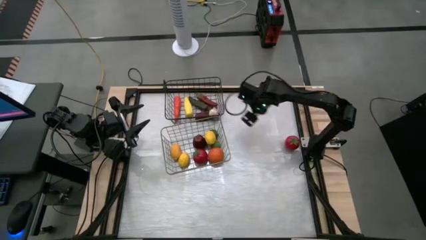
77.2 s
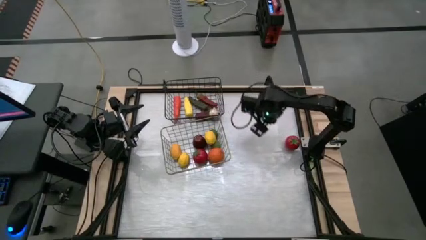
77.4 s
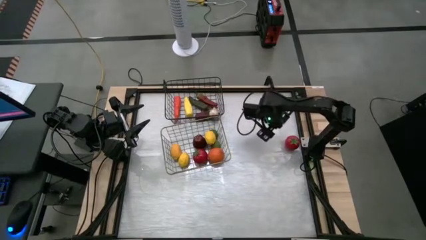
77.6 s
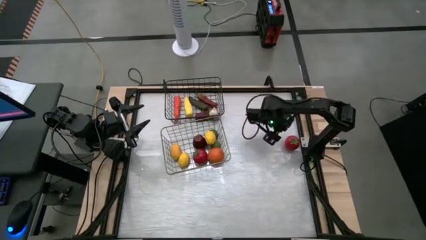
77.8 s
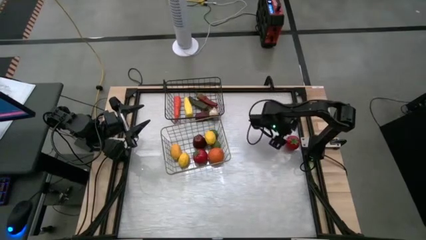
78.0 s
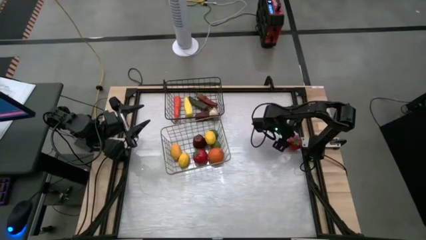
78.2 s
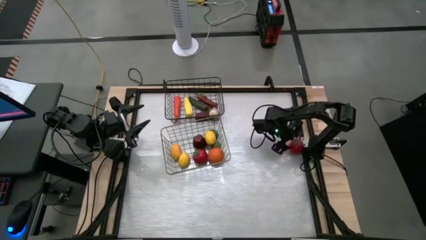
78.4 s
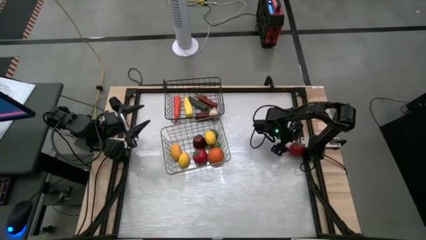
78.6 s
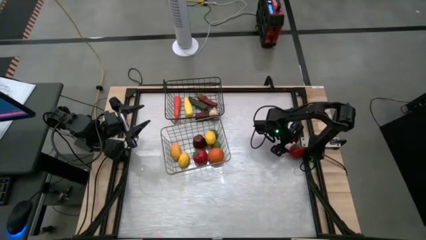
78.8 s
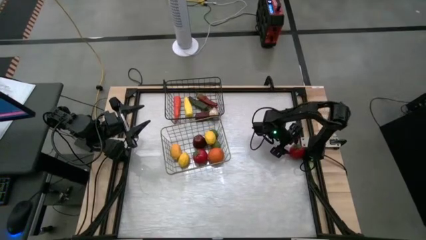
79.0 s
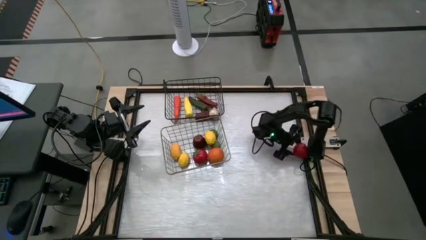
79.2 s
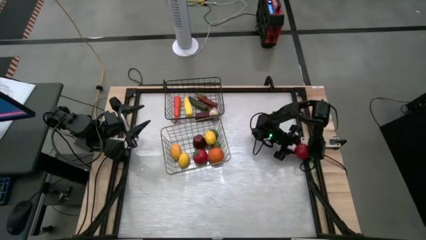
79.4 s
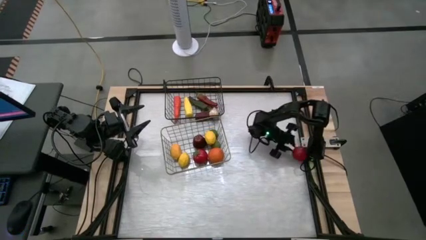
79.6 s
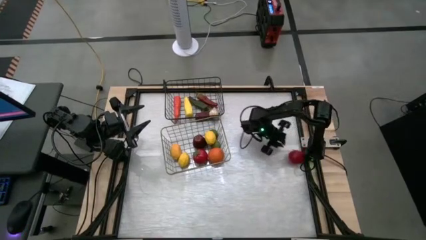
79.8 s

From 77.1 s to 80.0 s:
Task: Sort produce into baskets
Put the red tomato into the brown wire basket

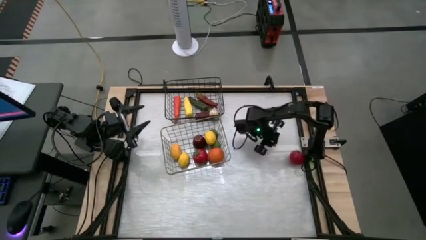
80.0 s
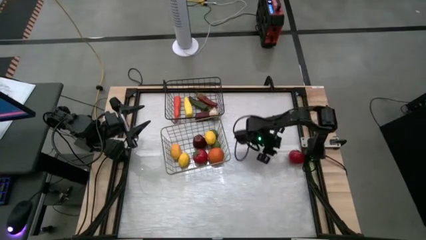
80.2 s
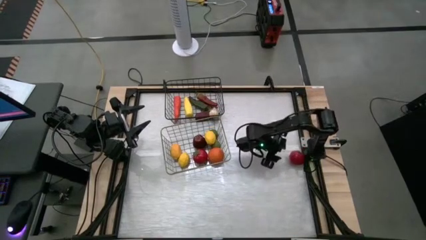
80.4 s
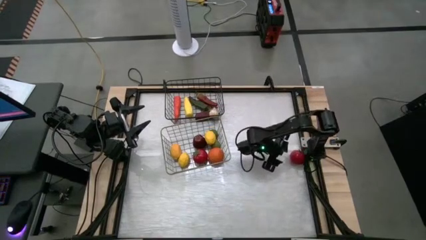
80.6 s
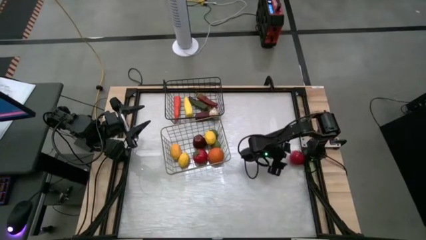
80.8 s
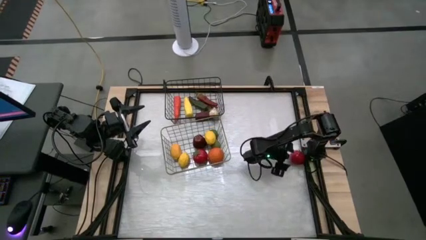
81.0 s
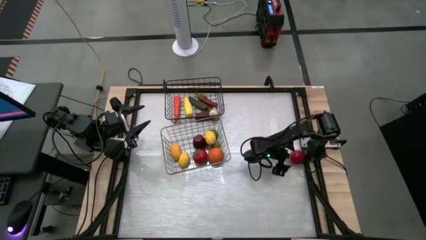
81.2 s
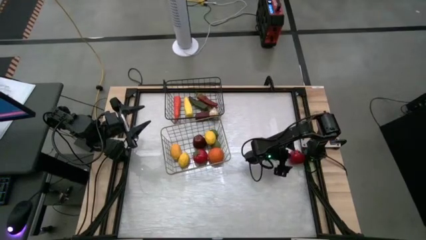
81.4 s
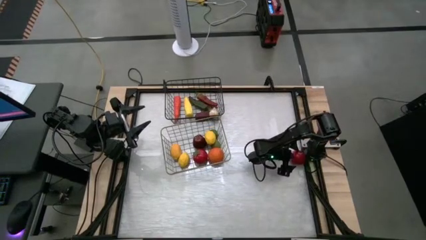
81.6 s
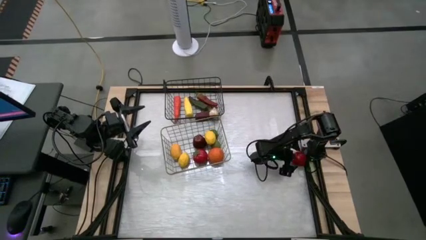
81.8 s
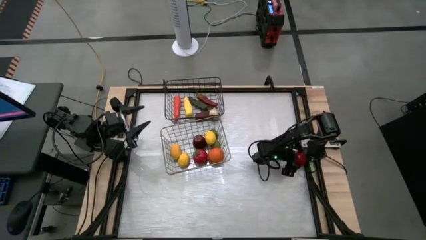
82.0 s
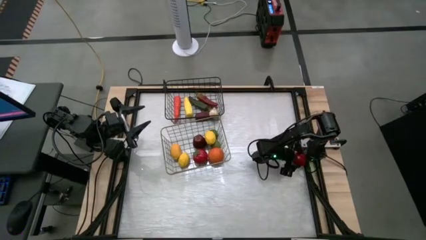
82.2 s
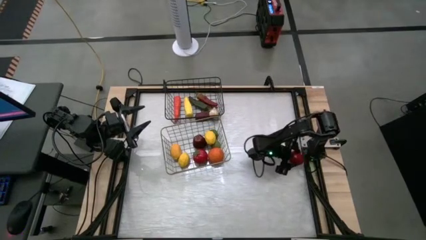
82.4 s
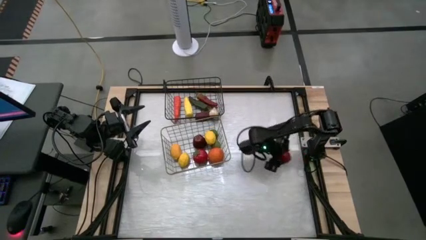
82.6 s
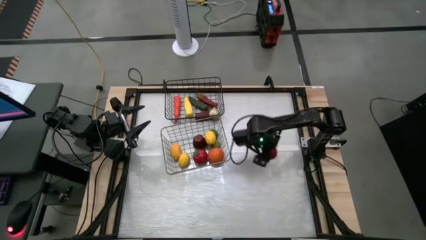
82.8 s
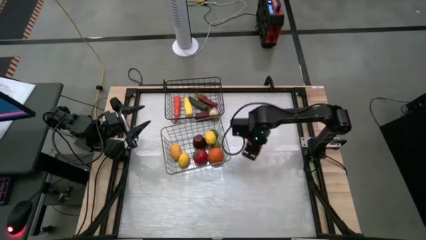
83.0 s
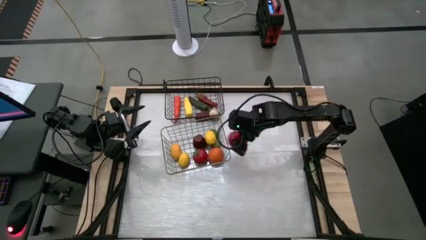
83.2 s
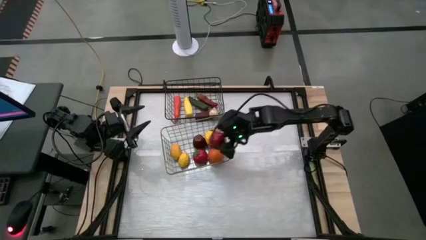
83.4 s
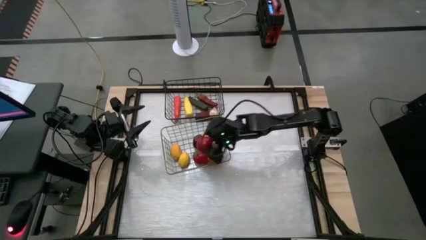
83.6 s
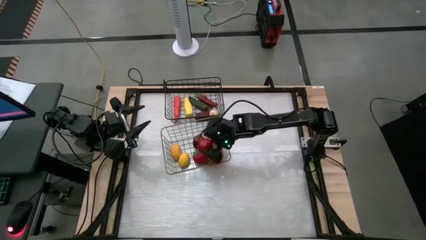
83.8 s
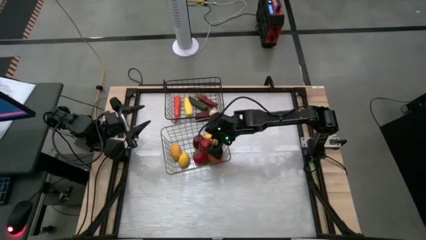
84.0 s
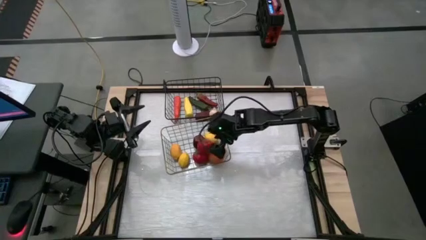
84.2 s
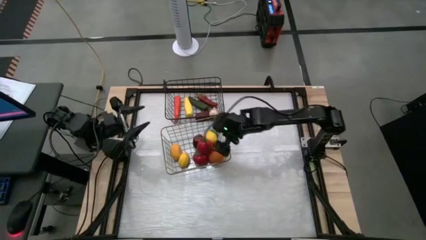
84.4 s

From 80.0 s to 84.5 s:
Put the red tomato into the brown wire basket

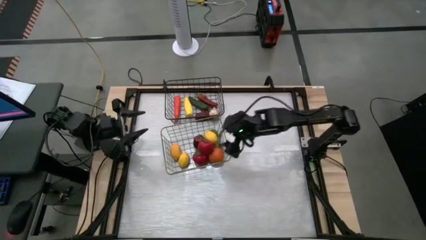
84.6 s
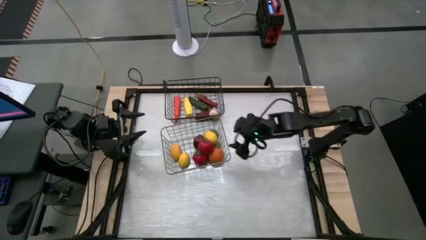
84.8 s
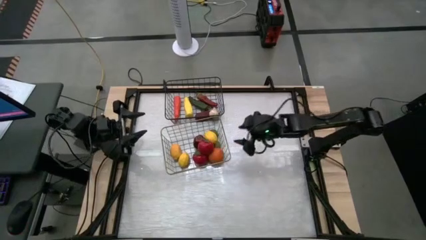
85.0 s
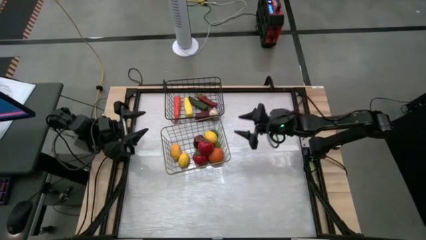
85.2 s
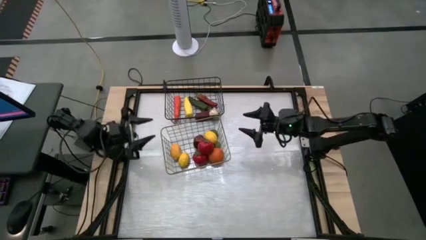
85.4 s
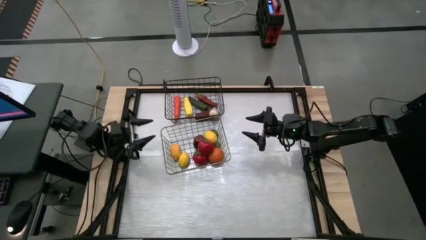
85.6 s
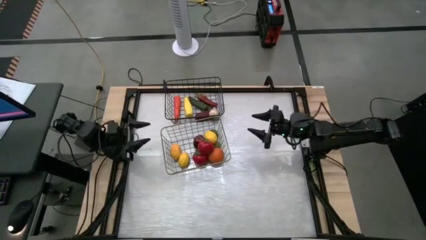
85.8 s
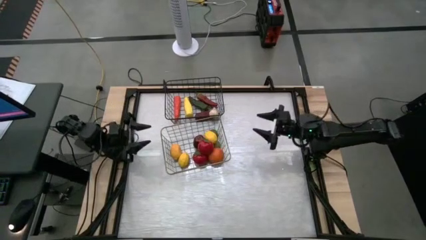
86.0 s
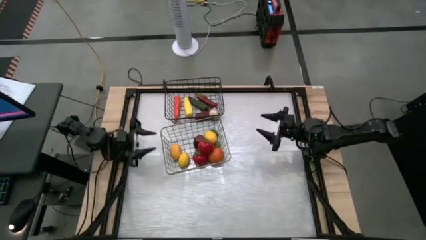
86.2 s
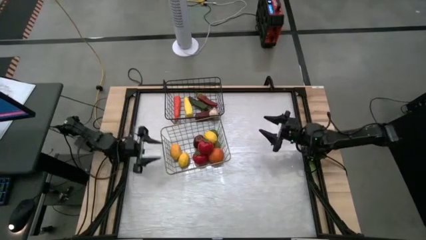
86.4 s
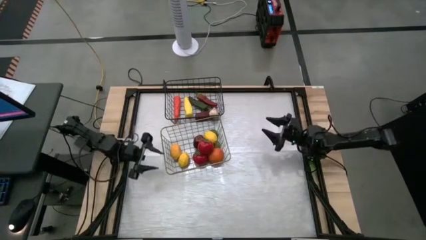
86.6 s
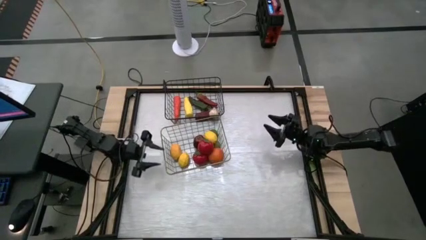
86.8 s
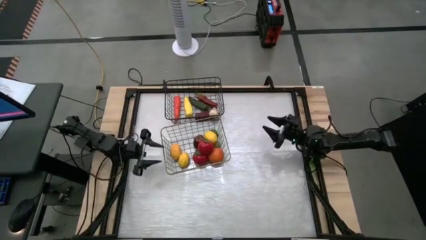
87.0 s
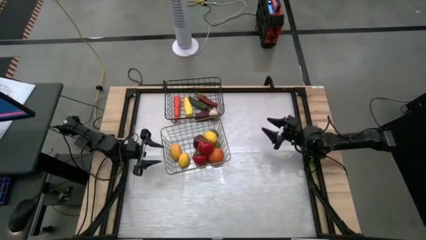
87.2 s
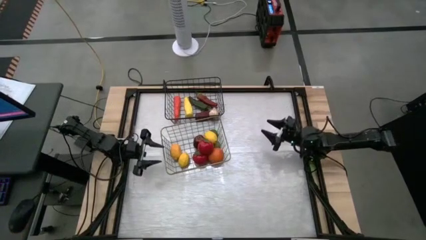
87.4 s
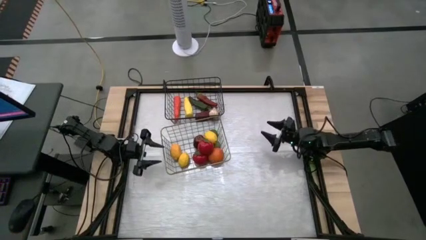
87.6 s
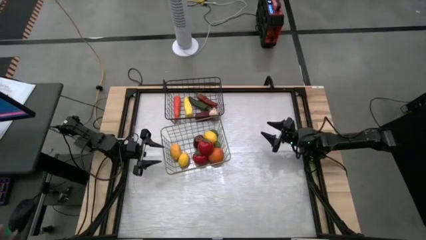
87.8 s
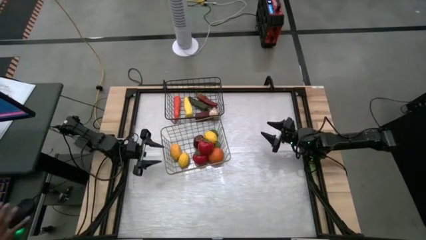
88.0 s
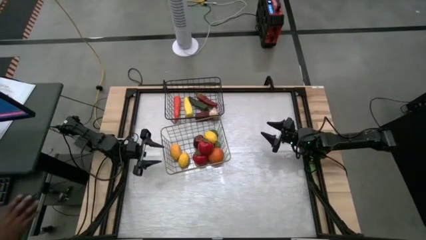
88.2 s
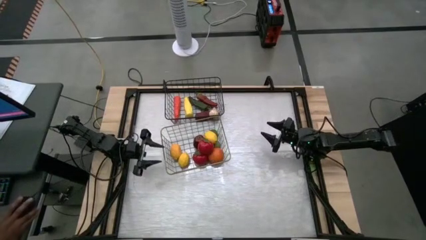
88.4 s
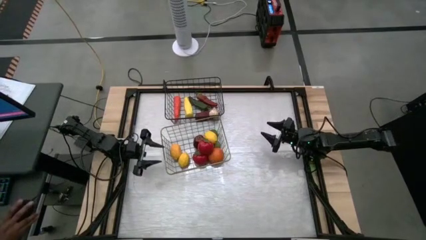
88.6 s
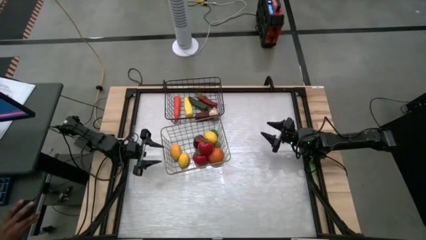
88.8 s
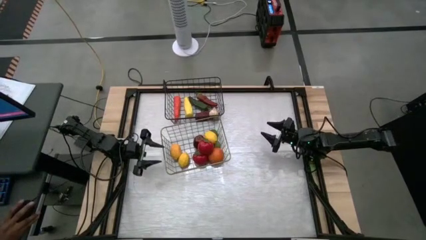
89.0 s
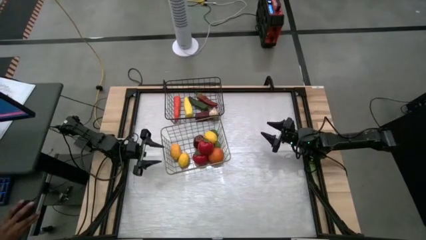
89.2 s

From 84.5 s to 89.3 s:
Return to Home Position

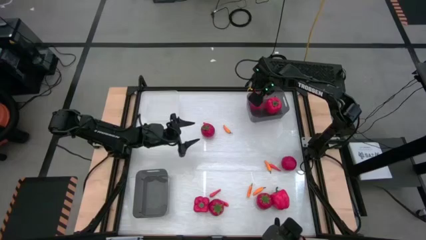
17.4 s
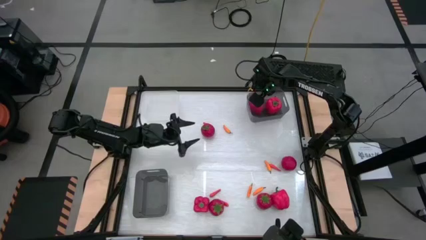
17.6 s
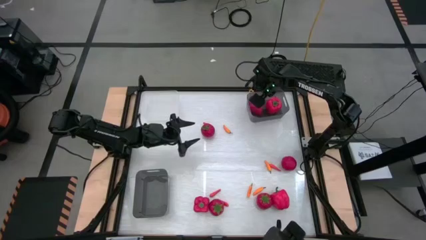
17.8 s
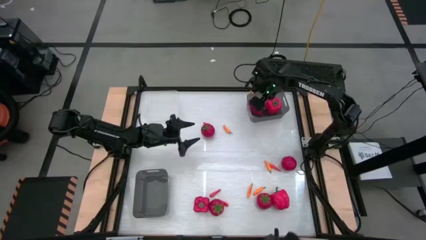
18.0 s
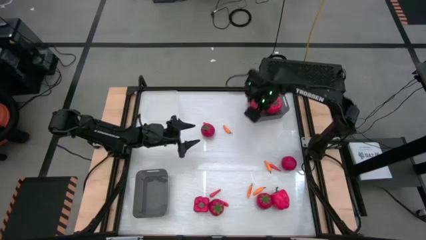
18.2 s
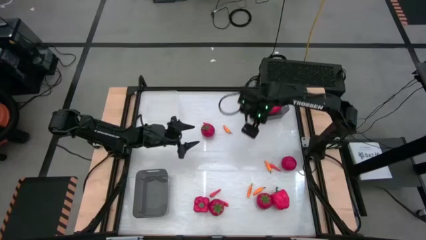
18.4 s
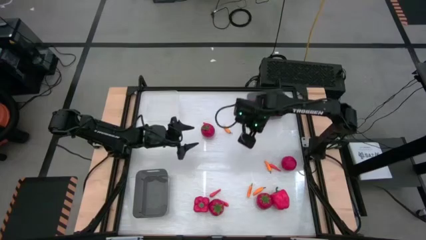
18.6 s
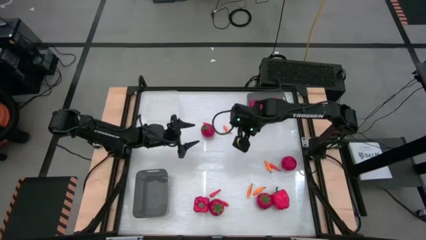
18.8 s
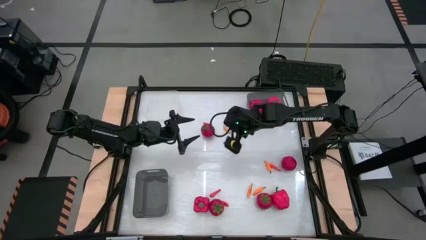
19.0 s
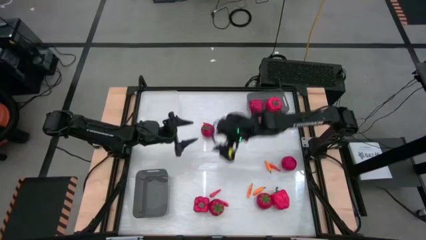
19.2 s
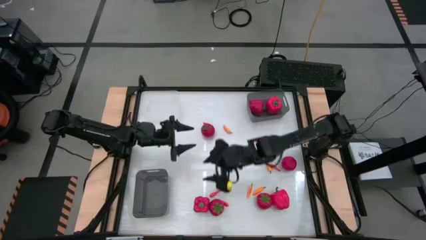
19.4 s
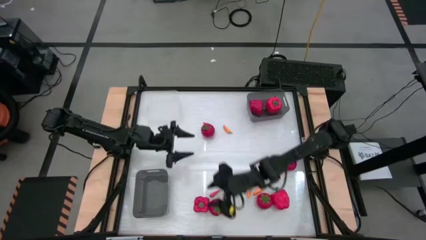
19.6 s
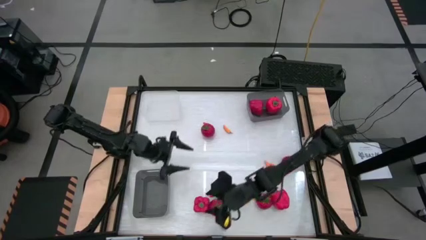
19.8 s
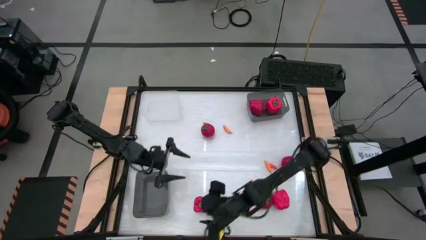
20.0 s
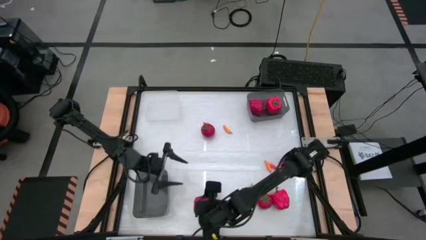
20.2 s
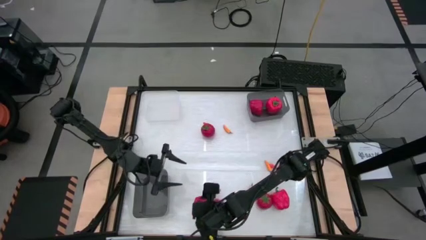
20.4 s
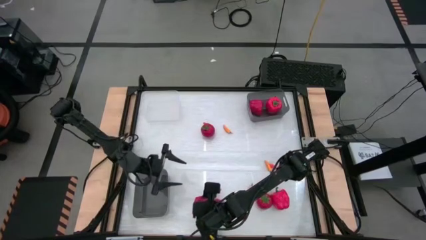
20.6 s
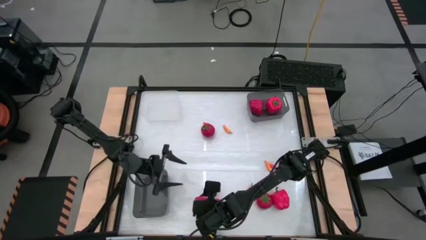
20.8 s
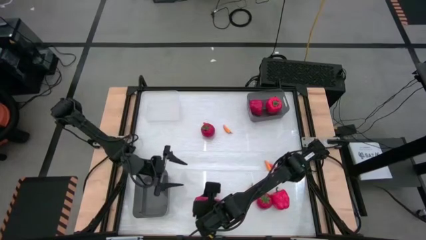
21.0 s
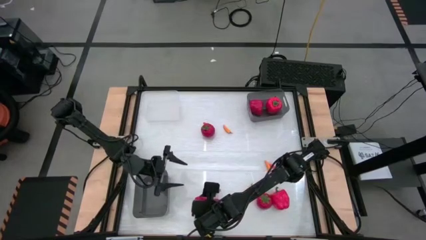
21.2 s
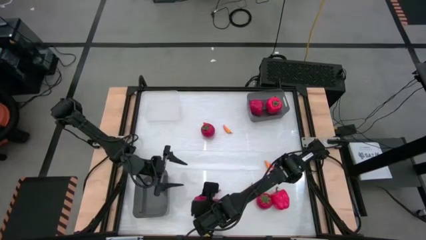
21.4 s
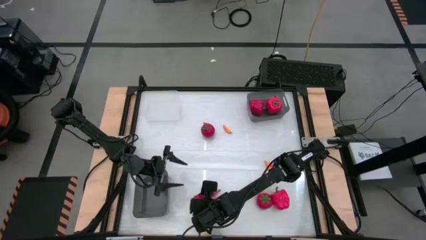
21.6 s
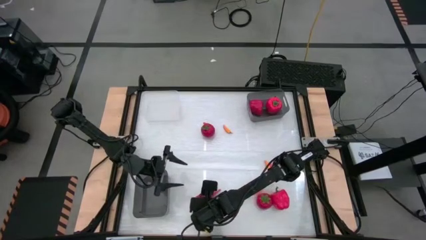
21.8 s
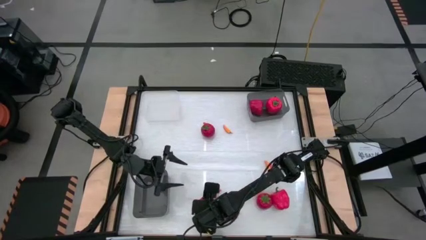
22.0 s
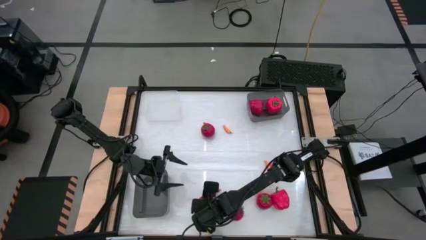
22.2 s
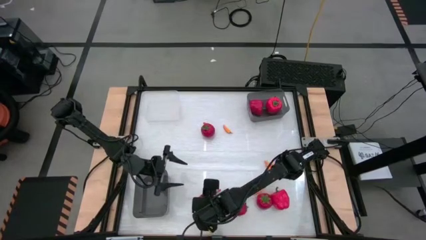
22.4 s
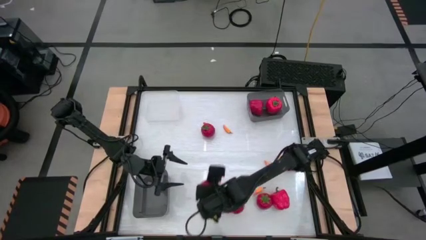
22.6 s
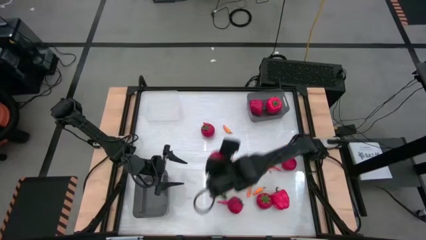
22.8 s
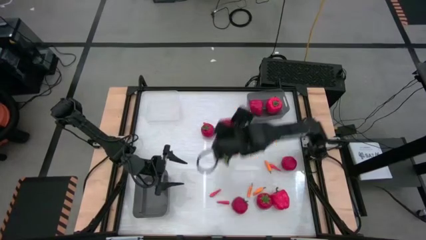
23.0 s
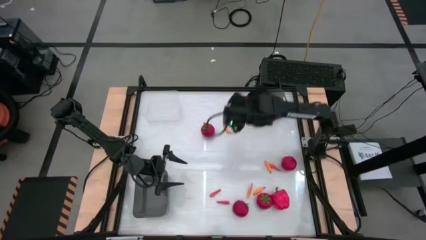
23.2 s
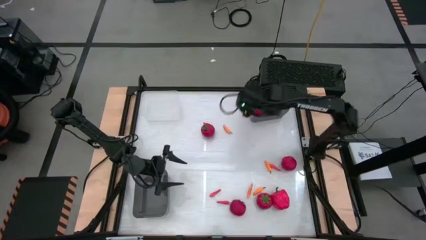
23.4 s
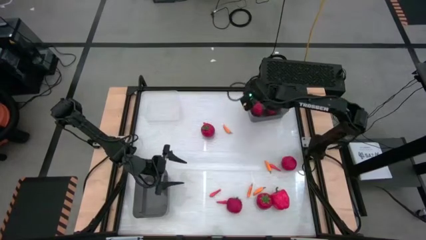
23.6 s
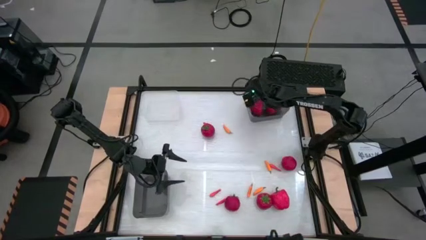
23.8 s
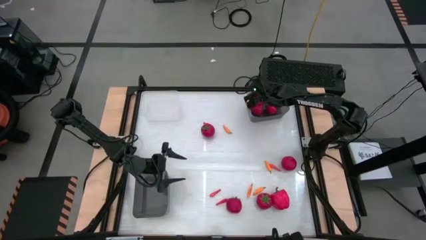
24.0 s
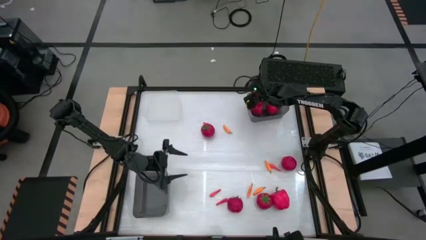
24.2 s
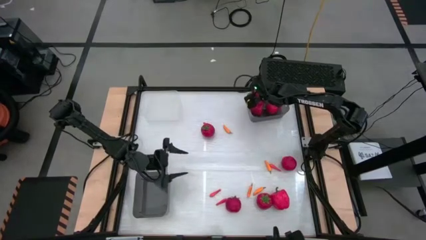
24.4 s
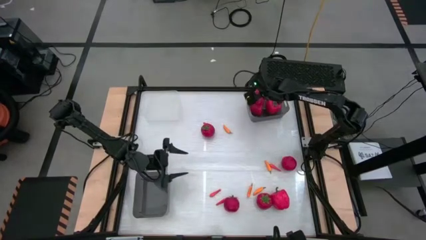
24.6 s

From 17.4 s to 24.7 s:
Task: Sort produce into baskets
Put the red bell pepper into the top black bin
